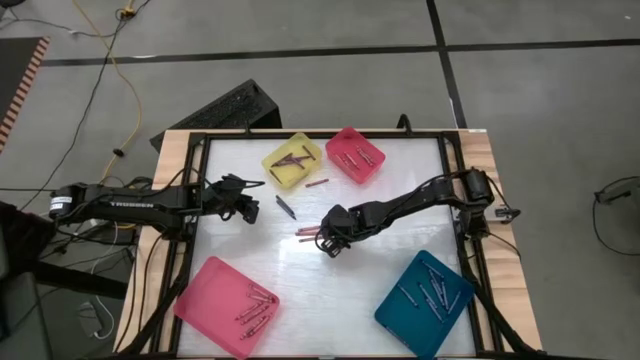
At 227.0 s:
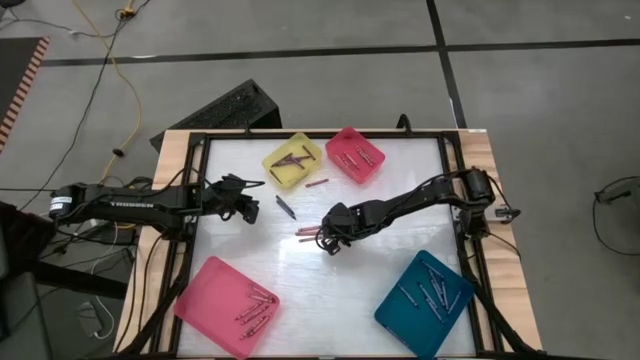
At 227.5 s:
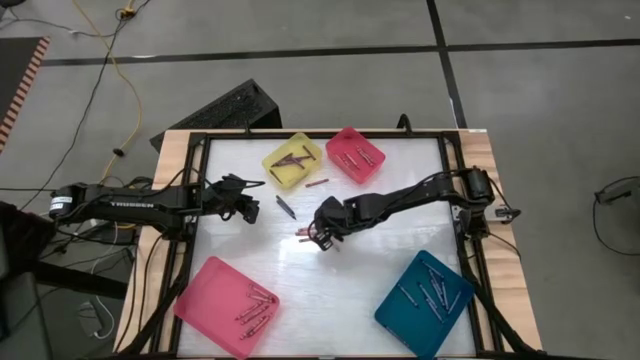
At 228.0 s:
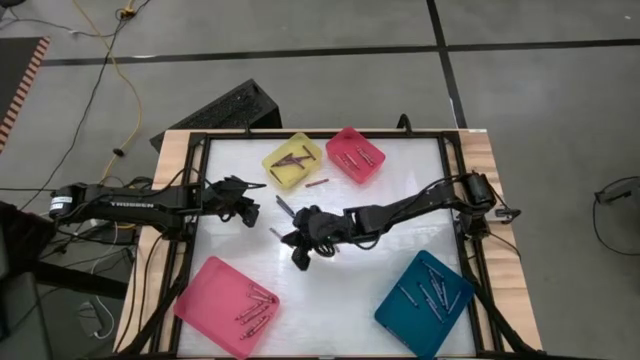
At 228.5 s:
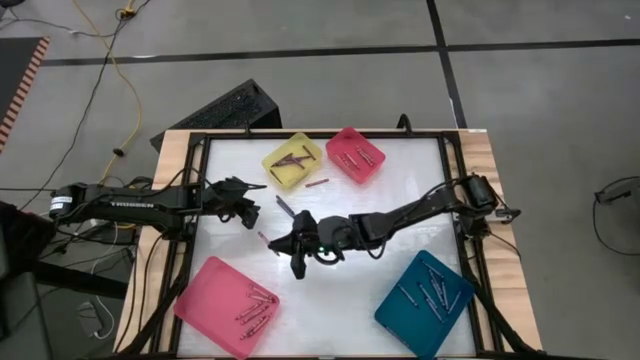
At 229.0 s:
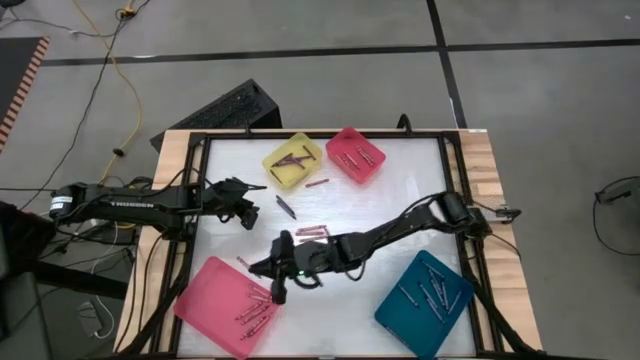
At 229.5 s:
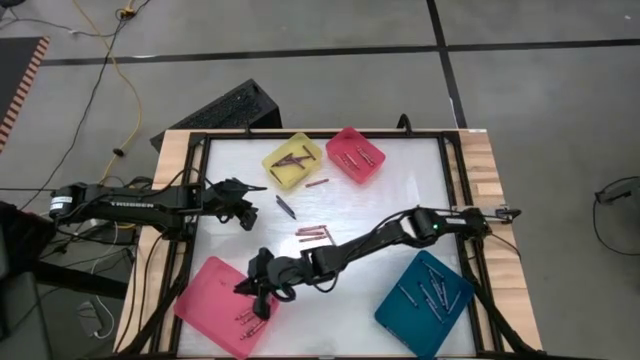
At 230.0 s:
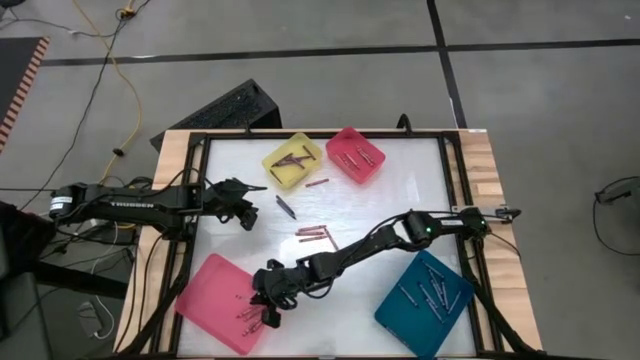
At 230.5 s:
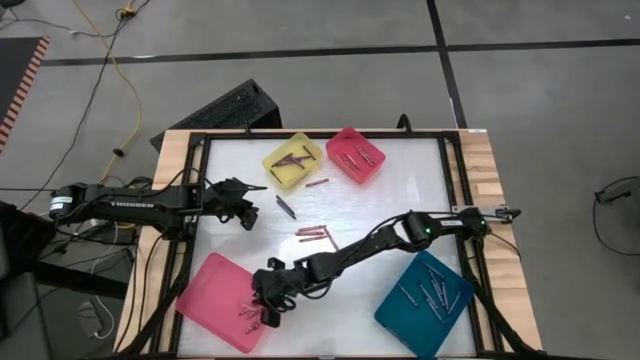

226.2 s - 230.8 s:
Task: Sort crayons
Put the red crayon into the pink bin

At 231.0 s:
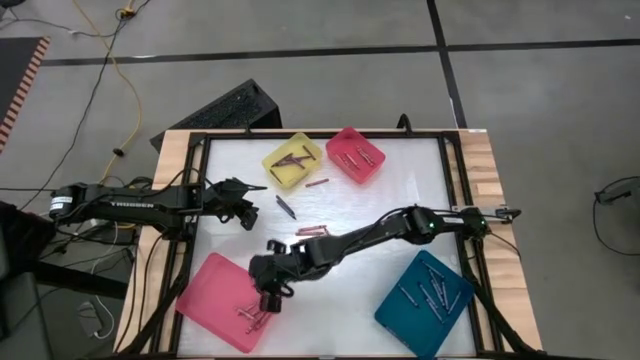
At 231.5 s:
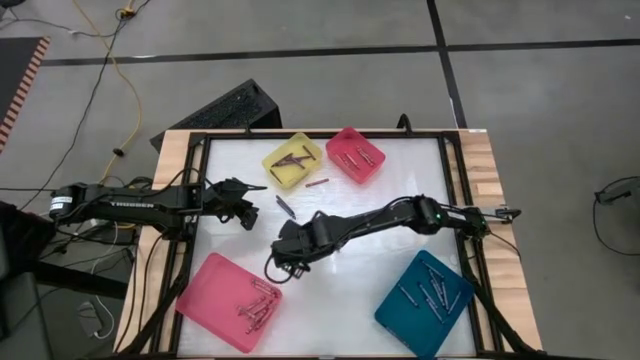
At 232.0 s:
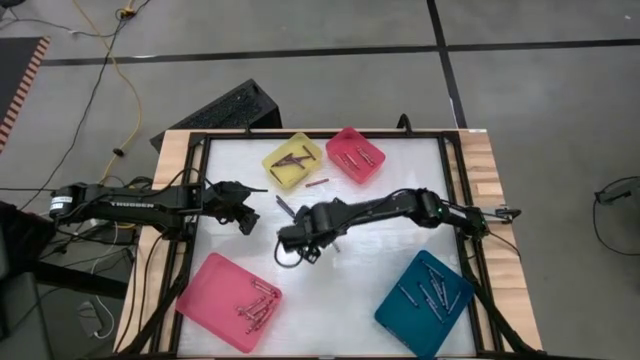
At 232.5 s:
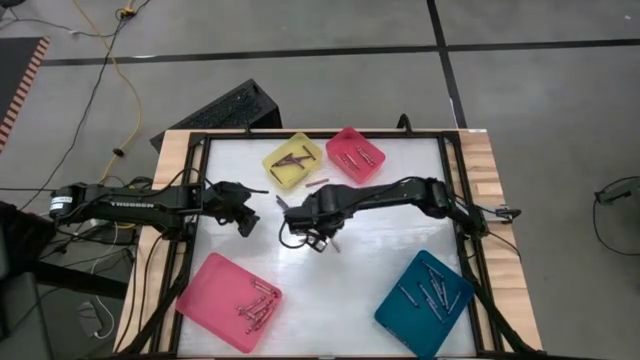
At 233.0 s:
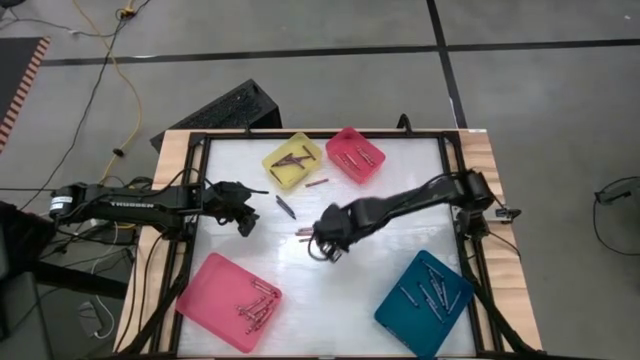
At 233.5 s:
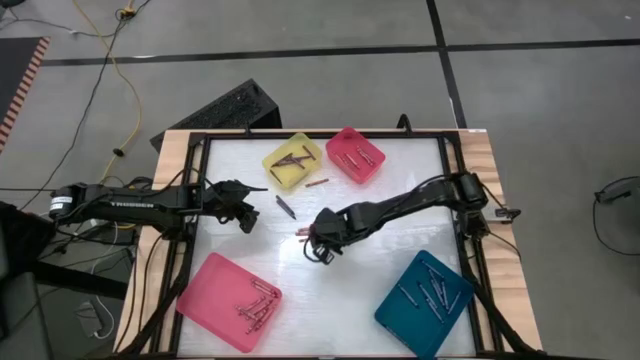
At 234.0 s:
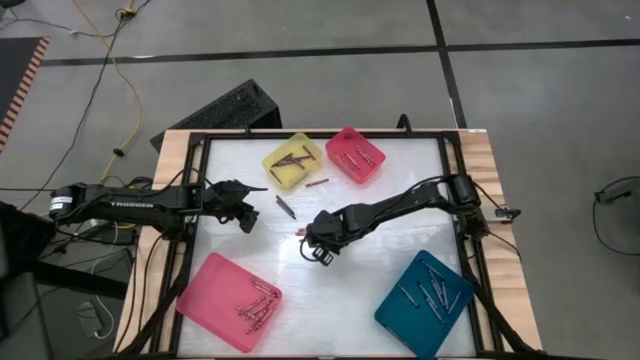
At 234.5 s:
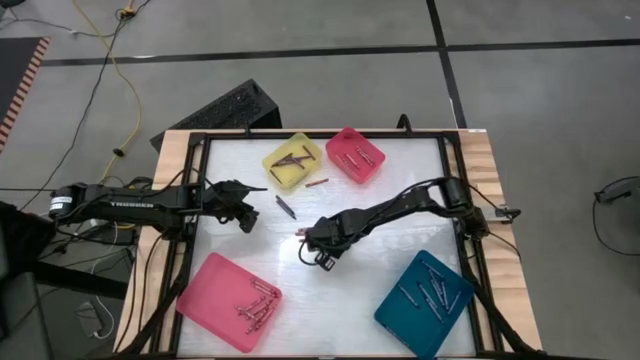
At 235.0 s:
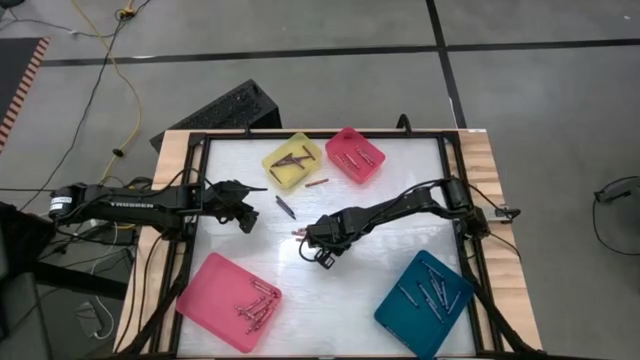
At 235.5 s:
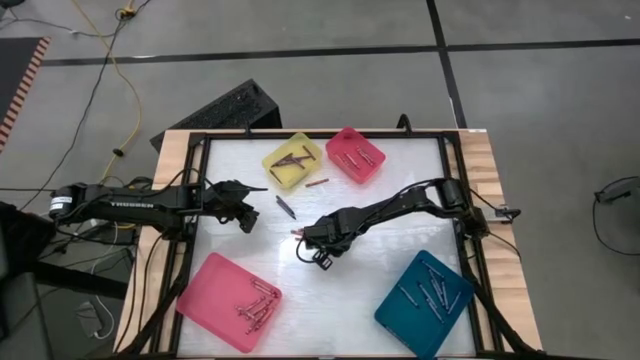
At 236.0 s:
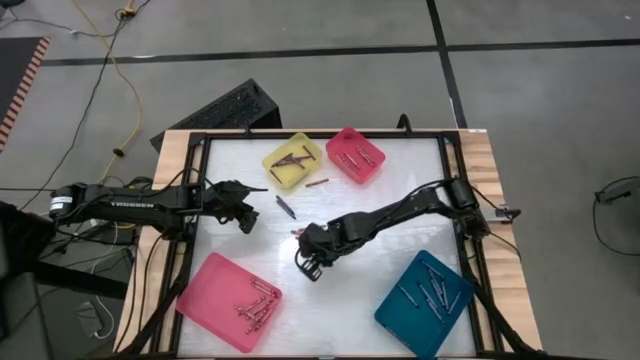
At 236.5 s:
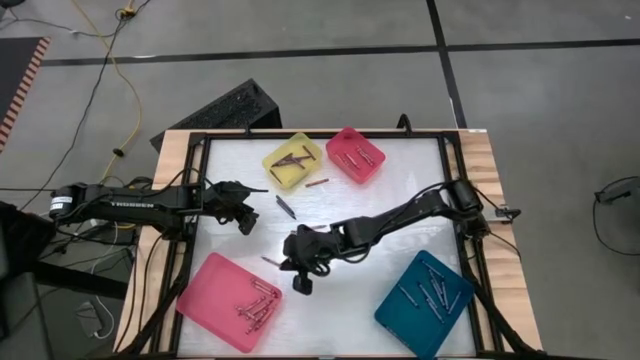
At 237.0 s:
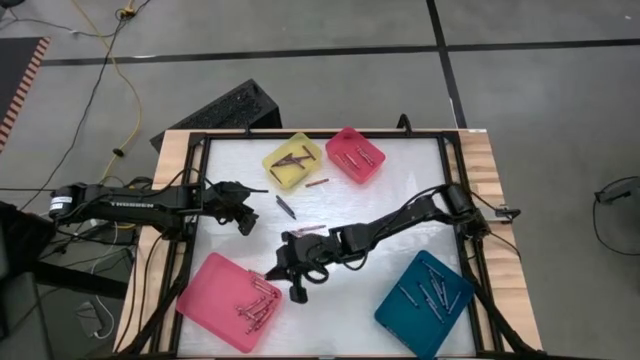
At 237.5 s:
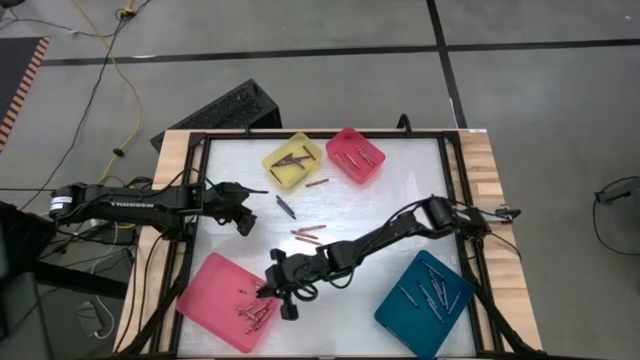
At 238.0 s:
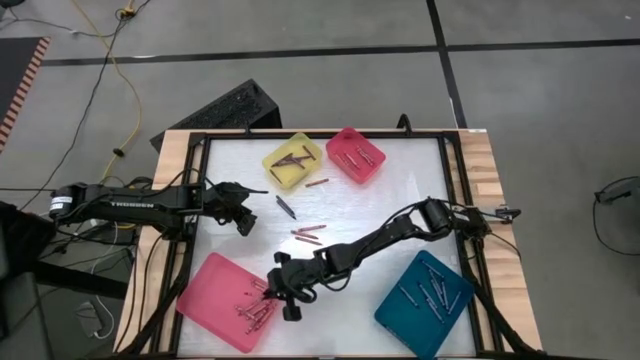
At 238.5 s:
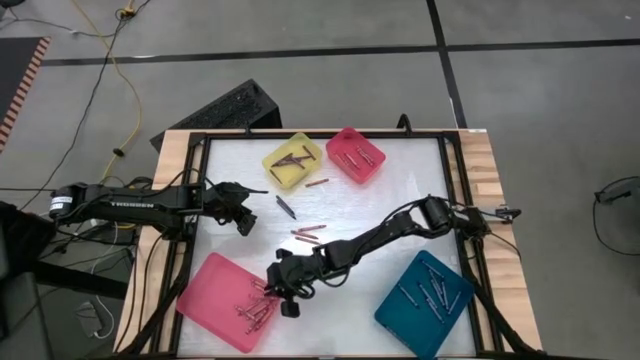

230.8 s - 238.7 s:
Put the red crayon into the pink bin

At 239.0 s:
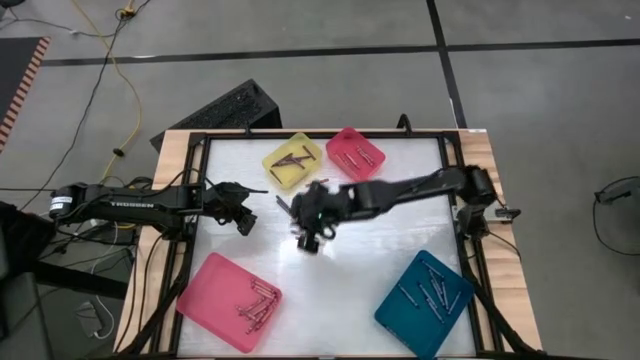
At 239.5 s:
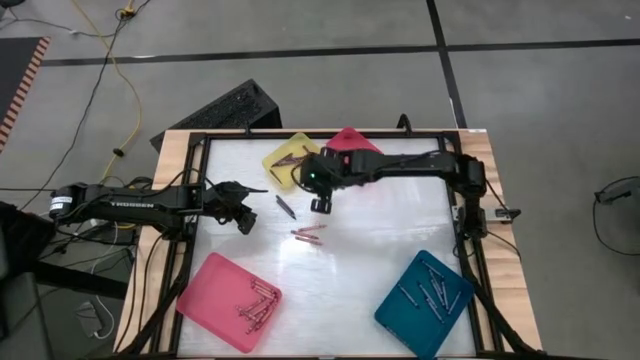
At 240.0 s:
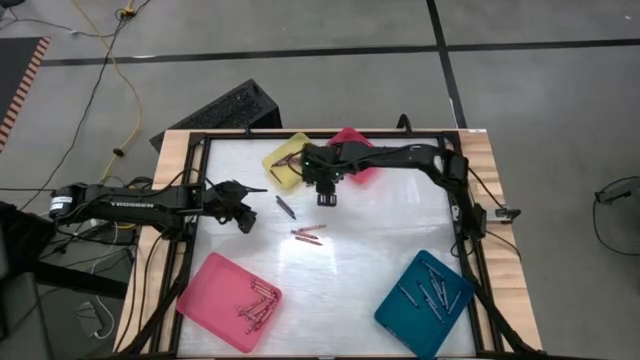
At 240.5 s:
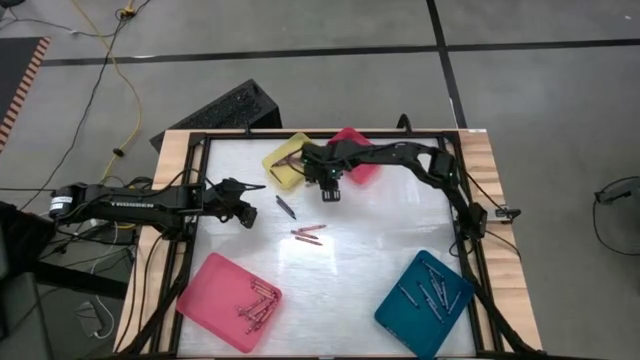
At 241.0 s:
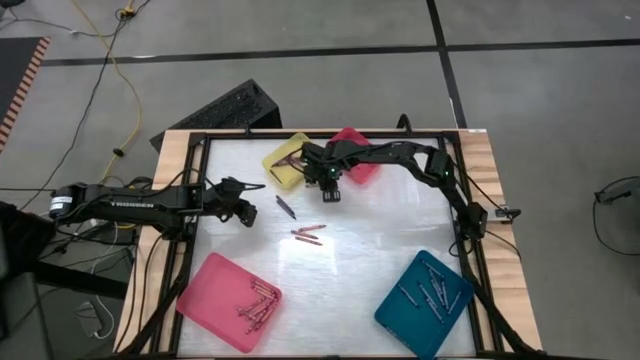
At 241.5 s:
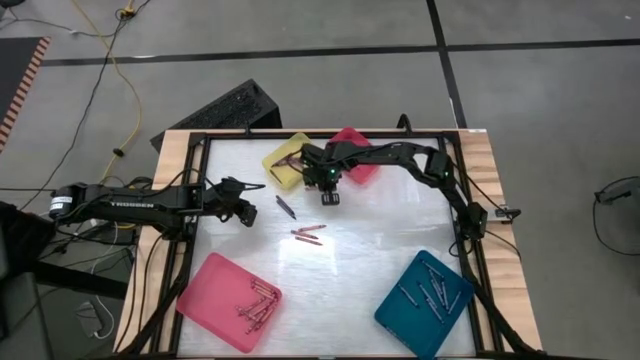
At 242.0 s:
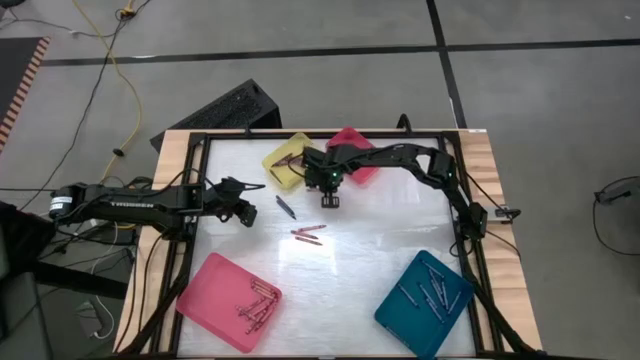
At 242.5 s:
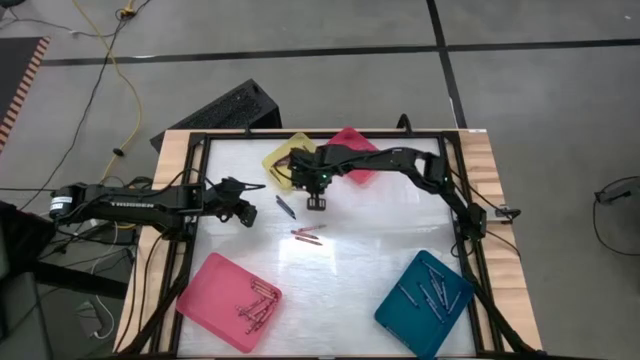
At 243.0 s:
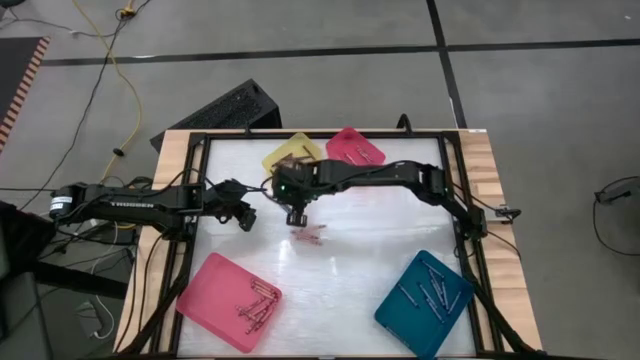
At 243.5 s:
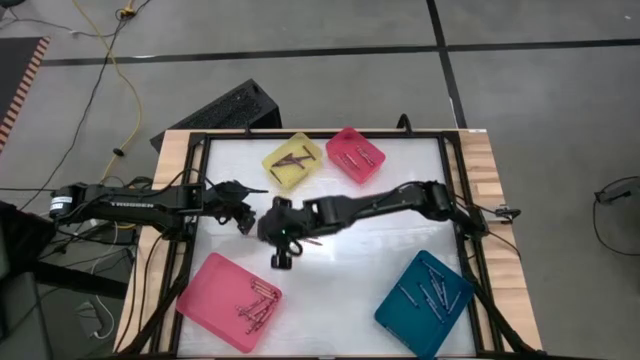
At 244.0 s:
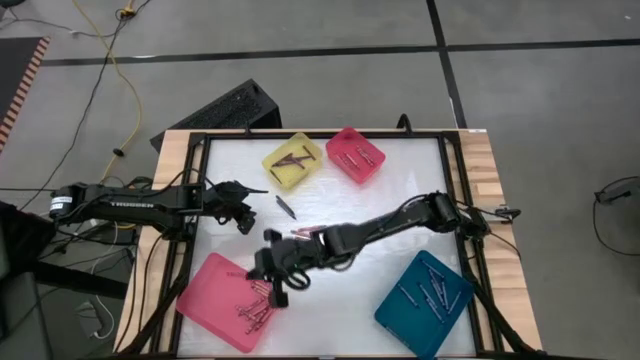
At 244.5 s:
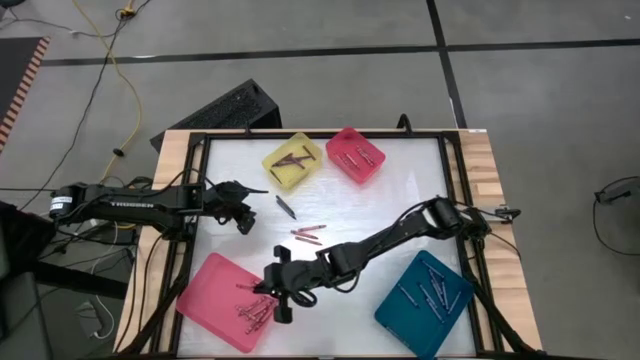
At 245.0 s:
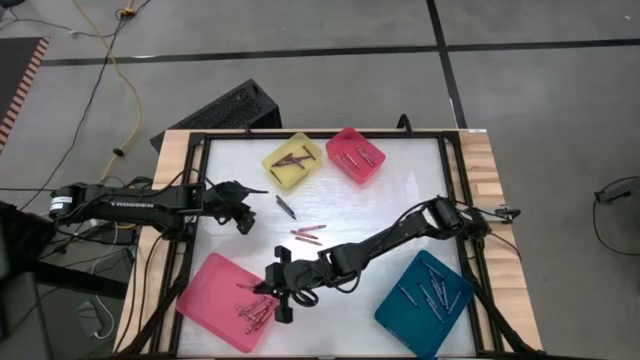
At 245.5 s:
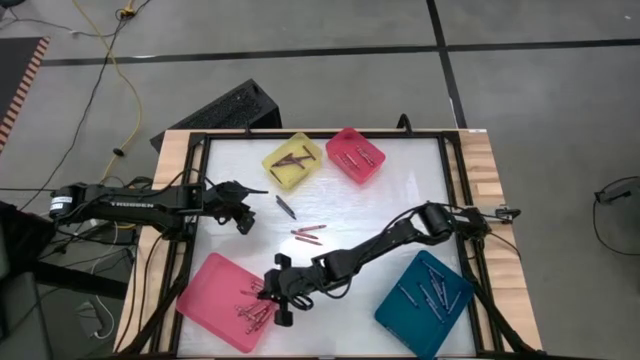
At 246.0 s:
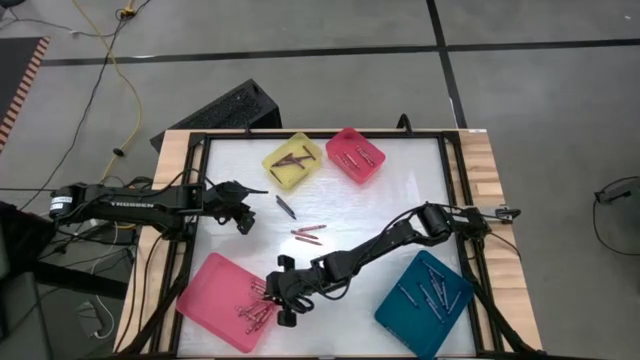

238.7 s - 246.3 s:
Put the red crayon into the pink bin
